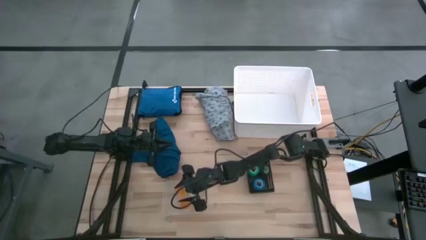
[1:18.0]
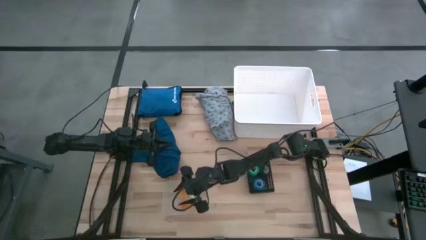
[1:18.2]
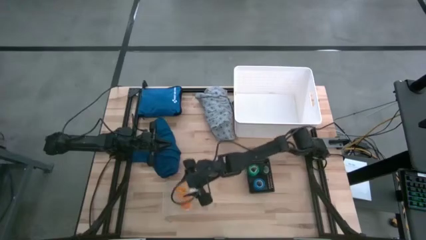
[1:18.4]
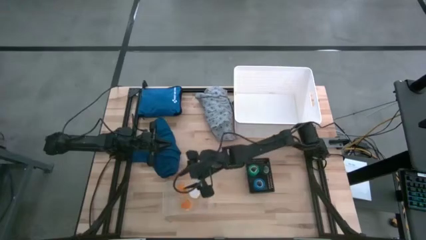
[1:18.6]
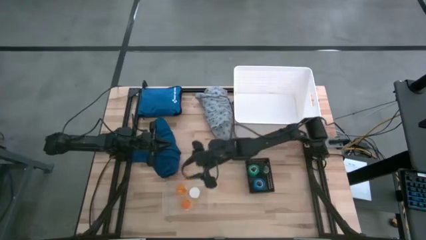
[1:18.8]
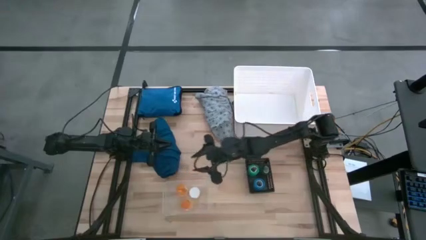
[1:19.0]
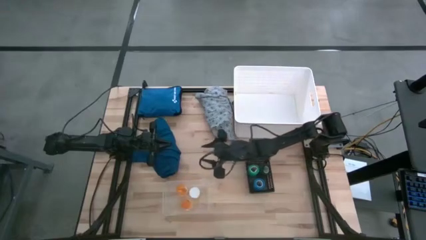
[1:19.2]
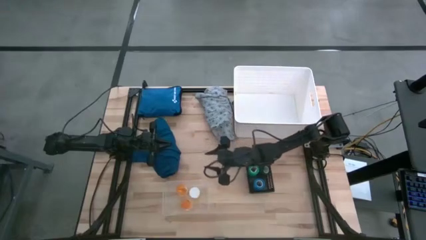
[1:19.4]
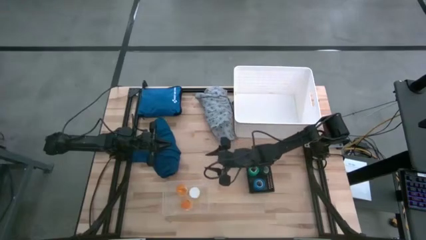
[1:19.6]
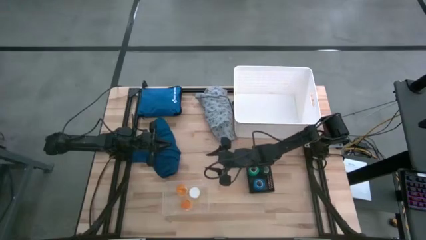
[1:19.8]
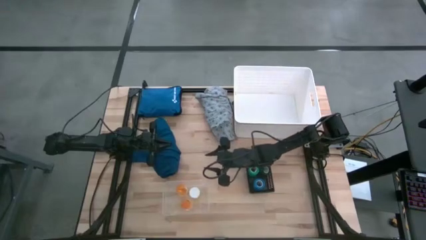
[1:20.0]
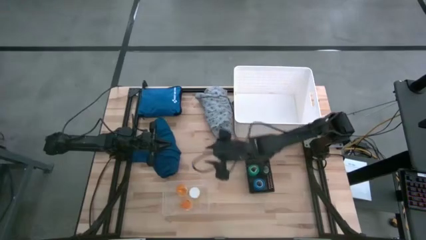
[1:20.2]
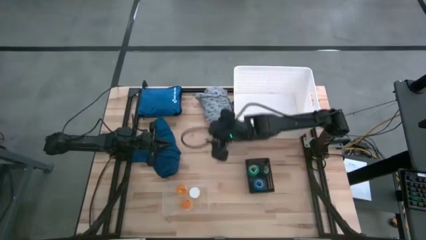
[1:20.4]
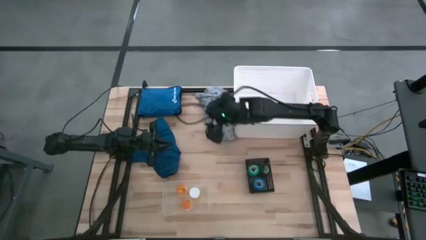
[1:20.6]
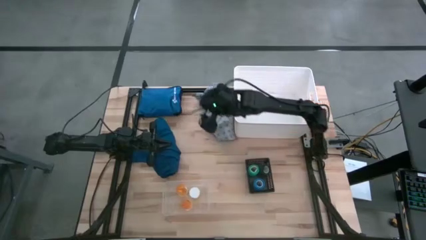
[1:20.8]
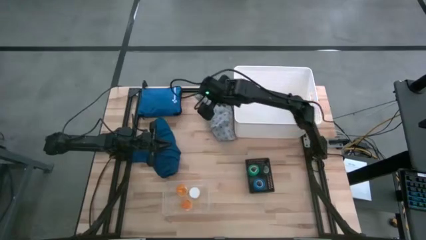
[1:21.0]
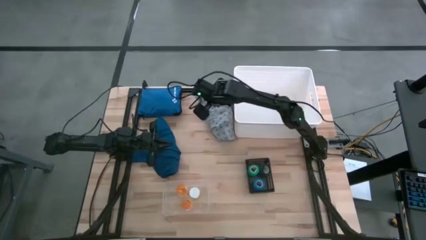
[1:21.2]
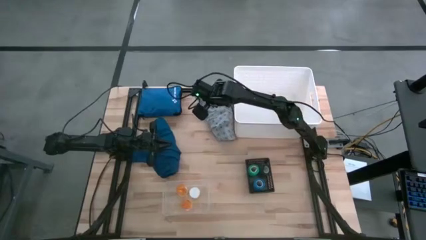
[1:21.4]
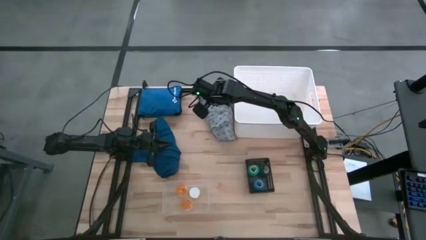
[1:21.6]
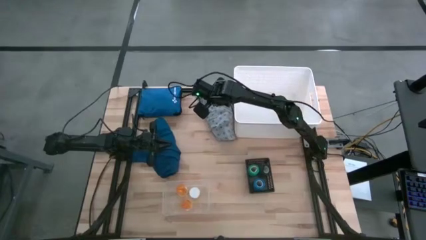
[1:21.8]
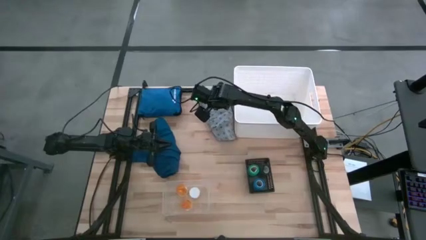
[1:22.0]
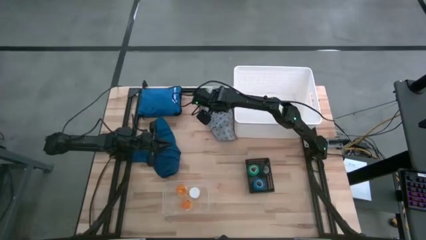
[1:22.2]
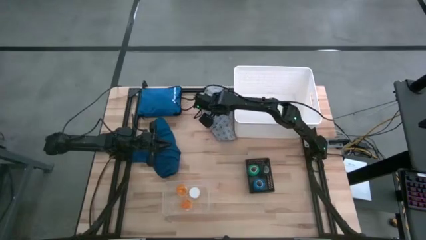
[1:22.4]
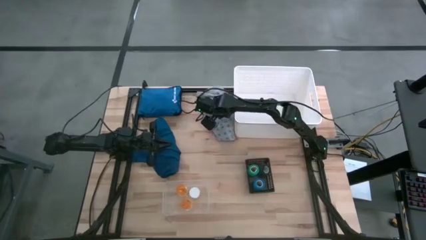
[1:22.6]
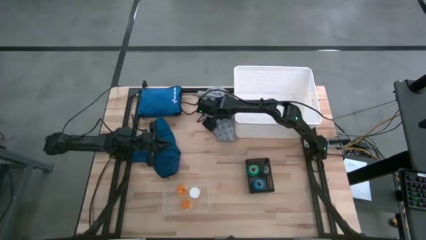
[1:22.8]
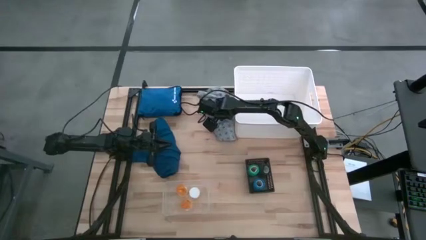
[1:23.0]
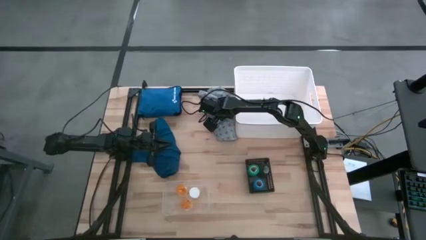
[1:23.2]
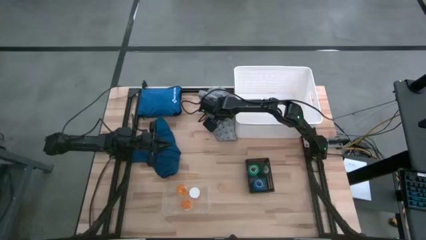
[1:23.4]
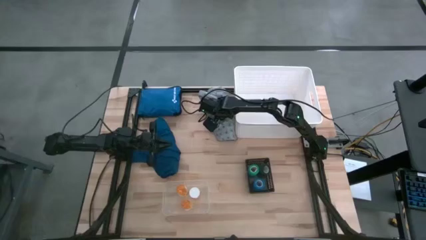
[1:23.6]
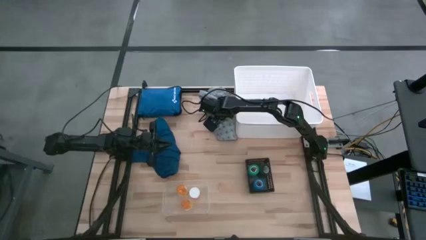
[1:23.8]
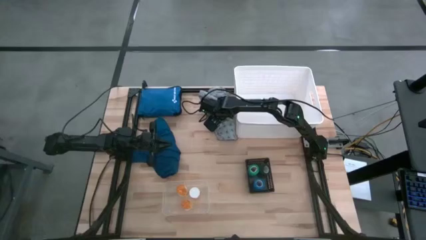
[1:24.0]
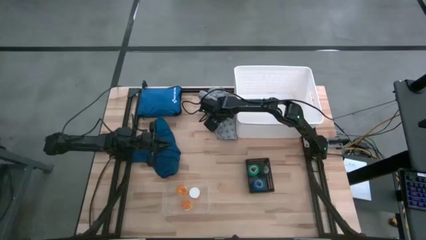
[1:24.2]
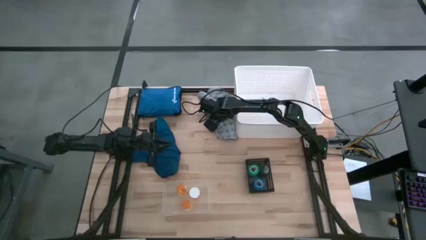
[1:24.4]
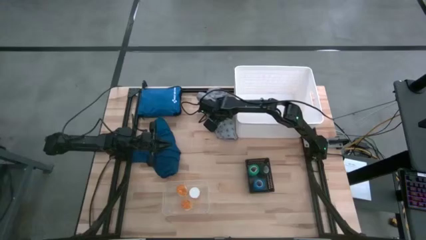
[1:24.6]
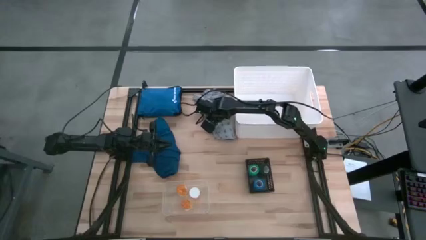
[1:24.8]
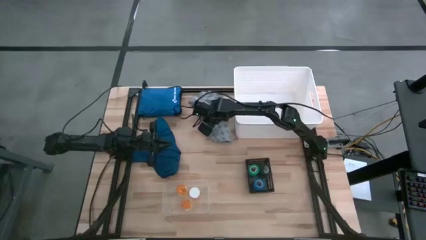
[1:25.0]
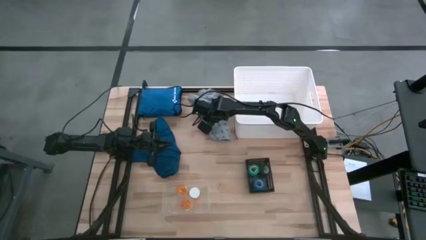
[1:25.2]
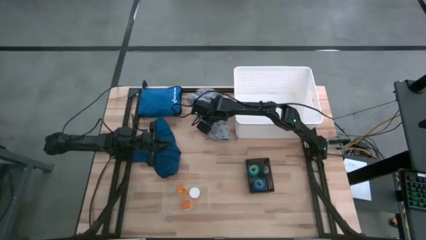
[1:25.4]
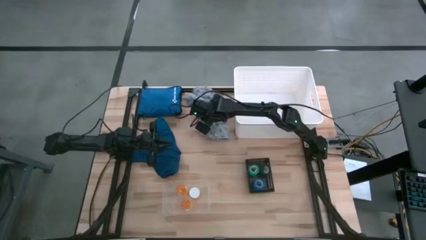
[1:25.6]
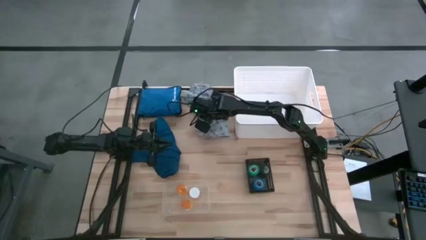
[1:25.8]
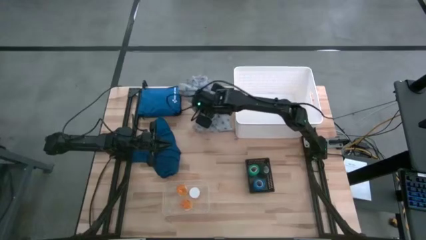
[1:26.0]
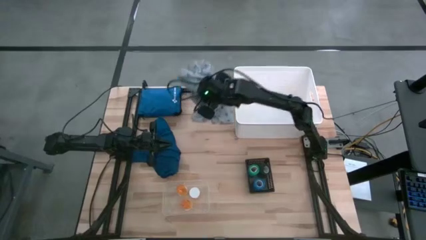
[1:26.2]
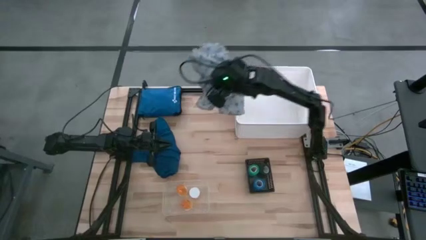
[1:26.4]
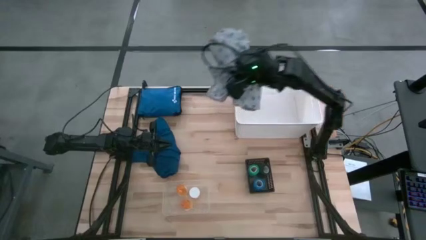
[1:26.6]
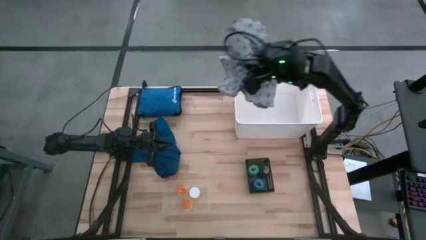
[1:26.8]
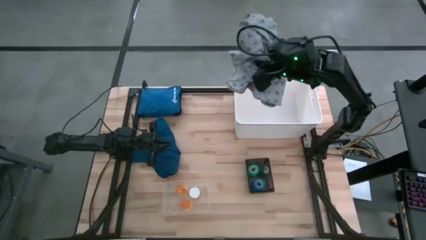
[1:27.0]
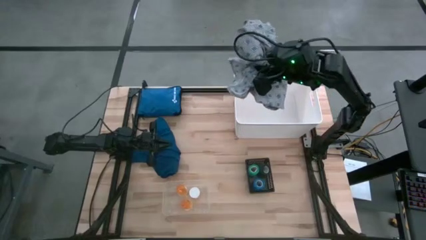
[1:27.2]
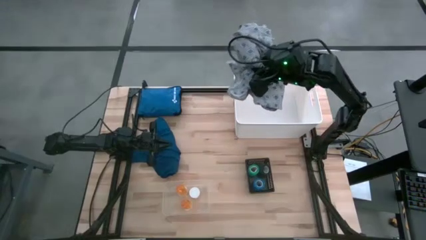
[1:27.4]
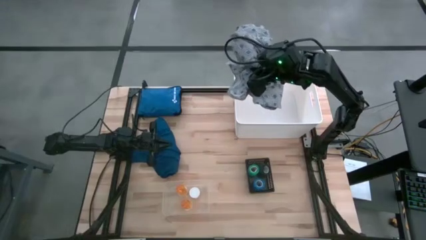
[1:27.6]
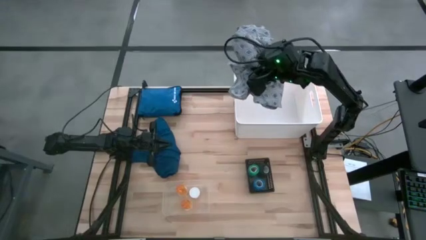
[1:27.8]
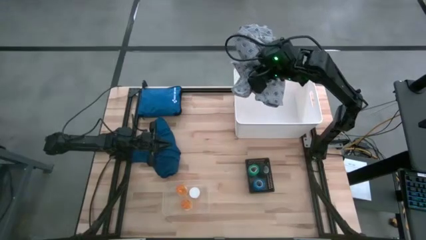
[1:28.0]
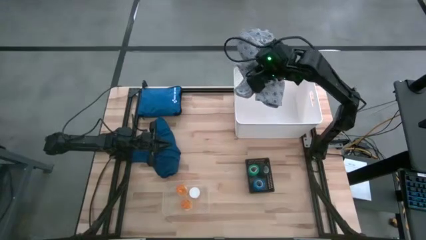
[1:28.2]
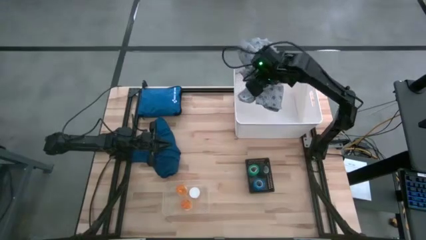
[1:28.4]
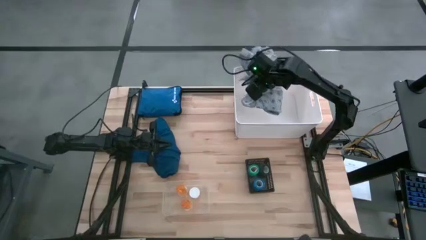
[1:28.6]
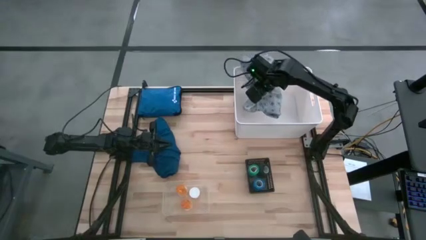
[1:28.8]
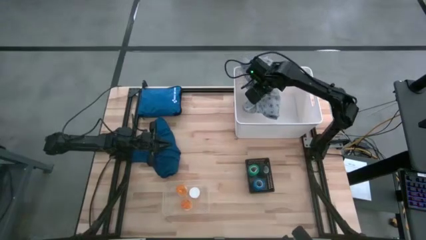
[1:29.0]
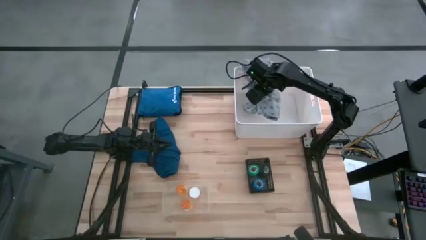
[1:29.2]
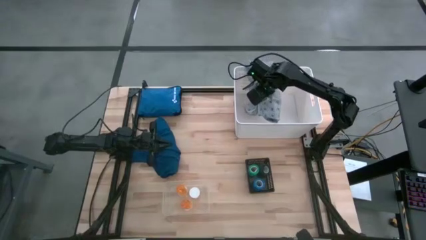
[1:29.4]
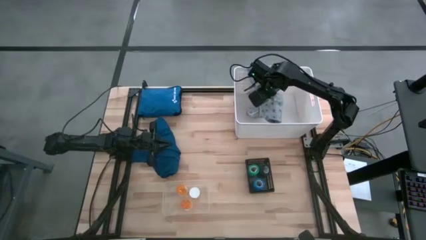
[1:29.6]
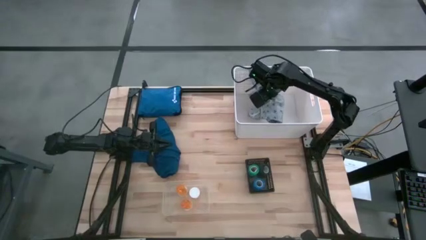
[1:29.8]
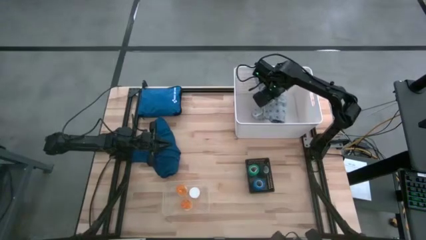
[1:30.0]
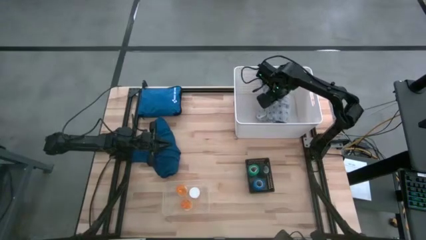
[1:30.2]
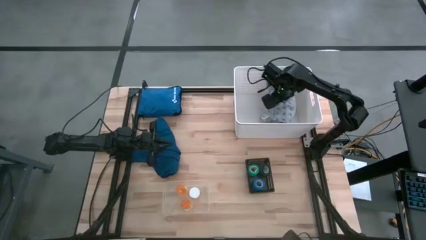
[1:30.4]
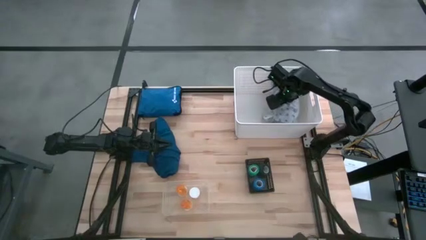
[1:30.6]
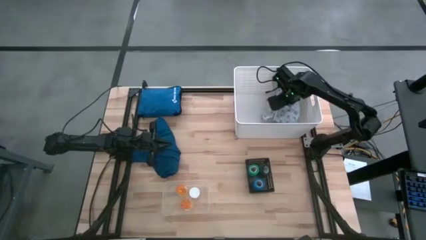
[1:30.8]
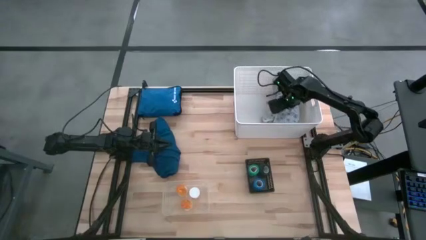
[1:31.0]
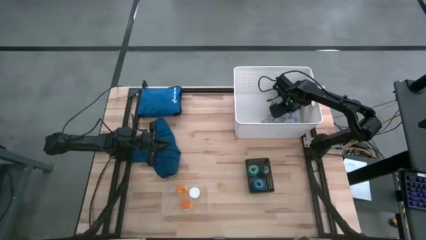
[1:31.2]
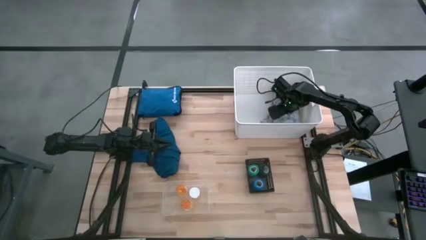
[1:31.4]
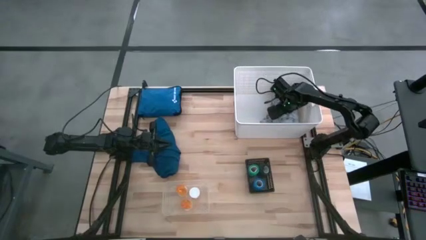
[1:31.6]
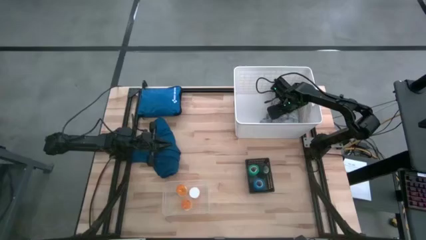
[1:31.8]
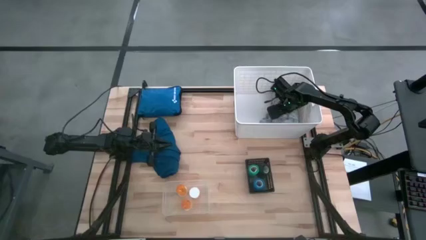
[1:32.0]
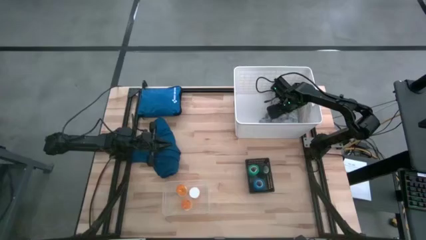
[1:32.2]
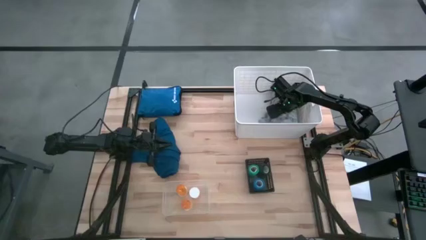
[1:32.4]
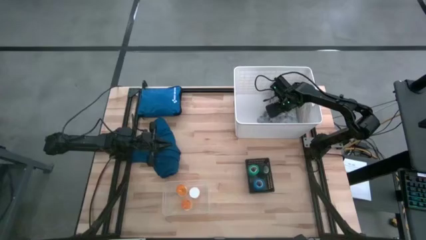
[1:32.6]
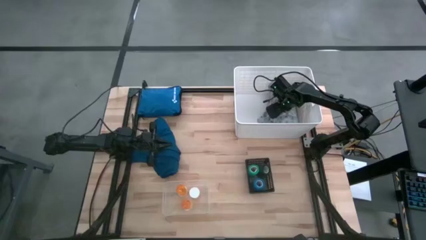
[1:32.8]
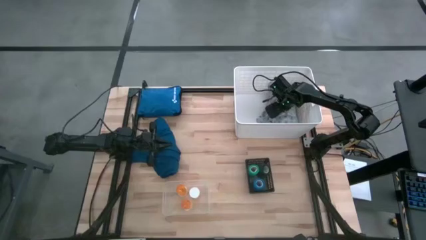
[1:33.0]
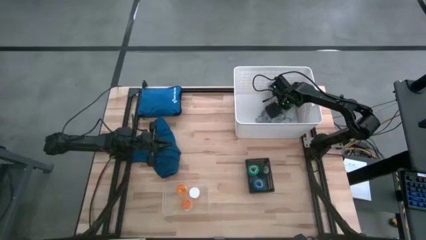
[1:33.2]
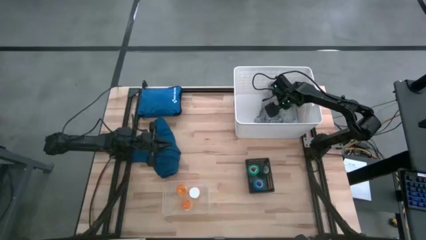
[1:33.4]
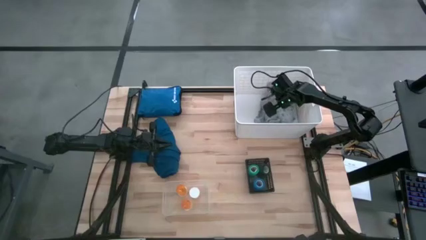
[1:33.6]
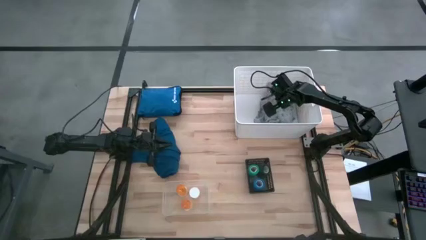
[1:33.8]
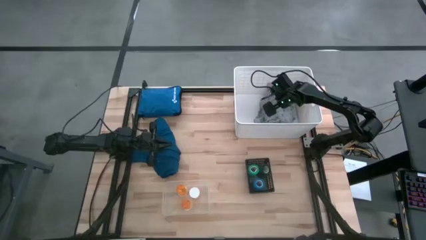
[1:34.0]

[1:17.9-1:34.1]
Task: Pick & place medical supplies in basket/bin
Put the gray patient gown into the white bin

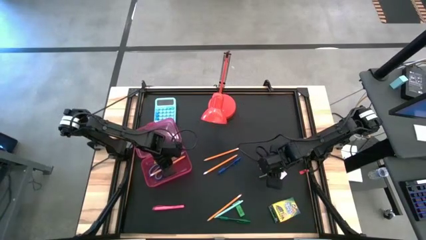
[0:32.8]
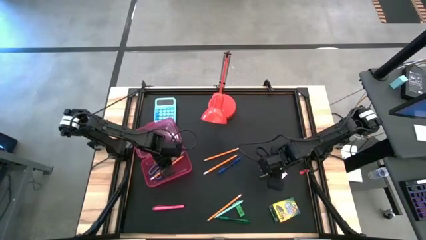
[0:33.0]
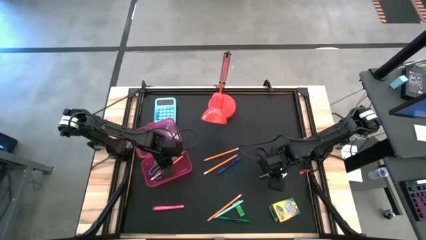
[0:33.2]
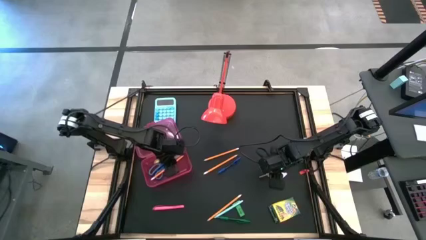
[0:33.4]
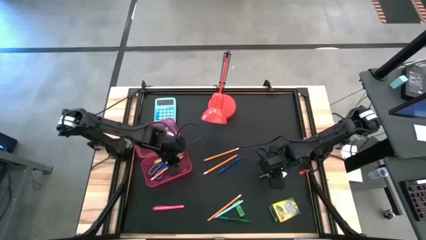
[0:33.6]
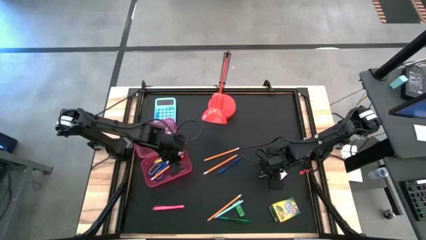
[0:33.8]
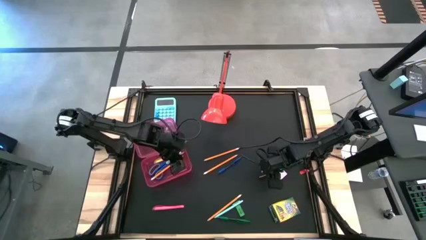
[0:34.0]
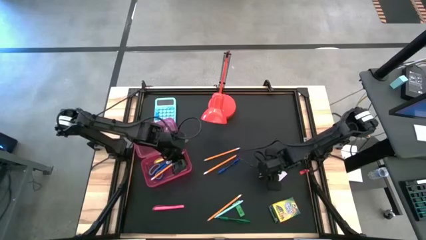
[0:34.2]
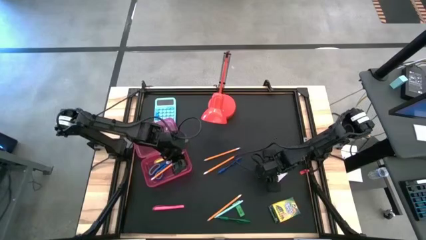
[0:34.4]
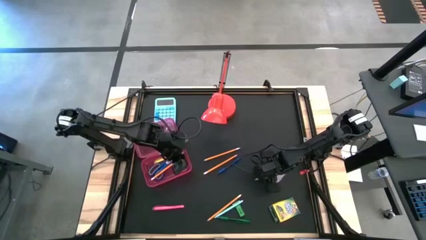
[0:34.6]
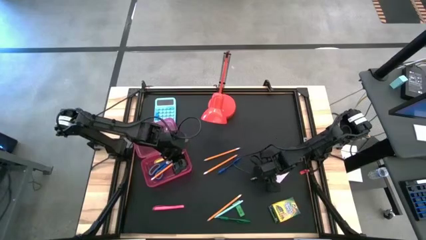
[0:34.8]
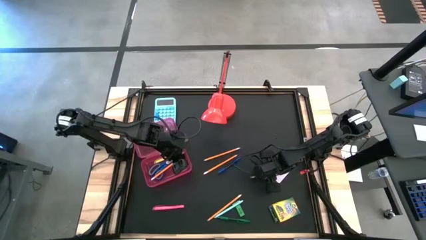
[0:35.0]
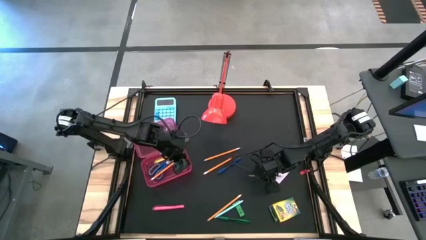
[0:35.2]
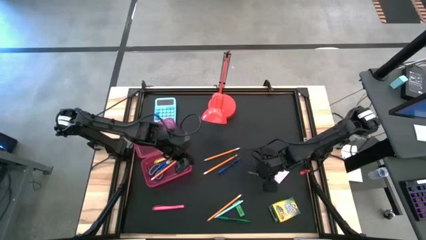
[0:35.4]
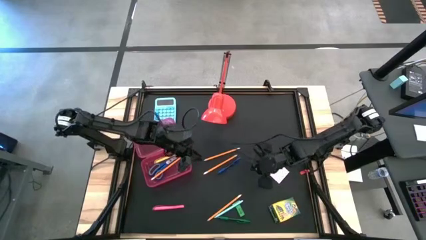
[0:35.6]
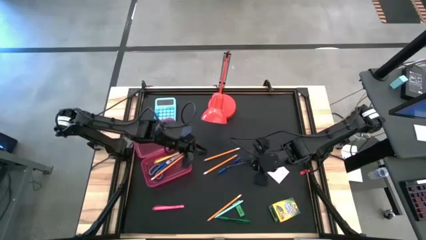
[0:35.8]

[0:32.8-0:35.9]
Task: Pack school essentials
Put the dark blue pencil into the red supply box
